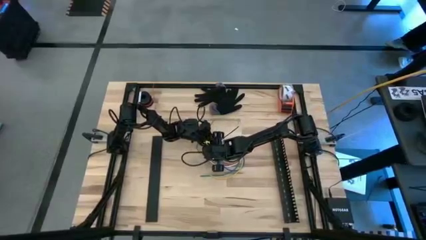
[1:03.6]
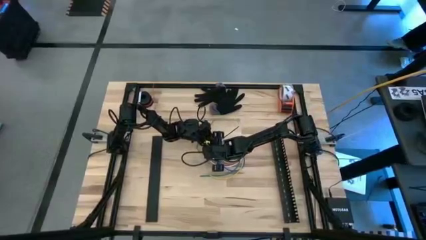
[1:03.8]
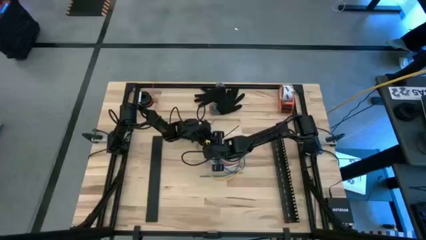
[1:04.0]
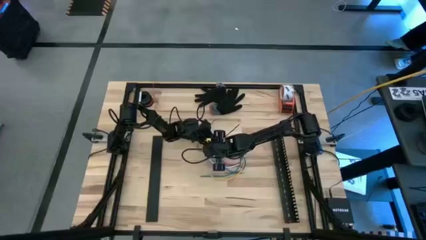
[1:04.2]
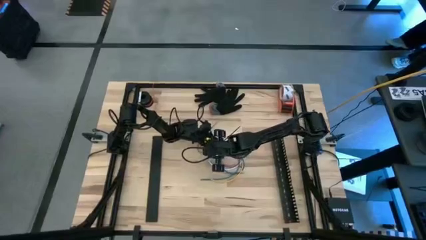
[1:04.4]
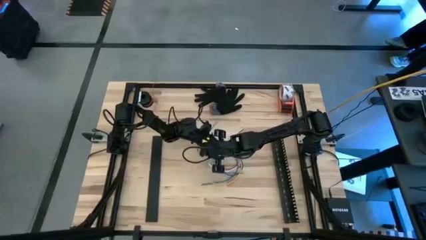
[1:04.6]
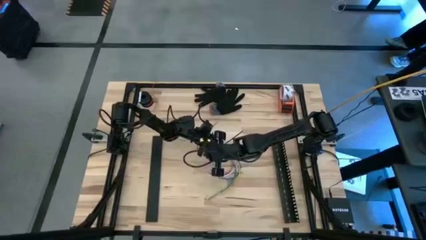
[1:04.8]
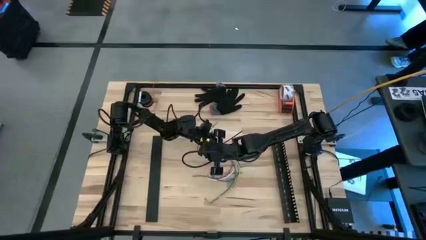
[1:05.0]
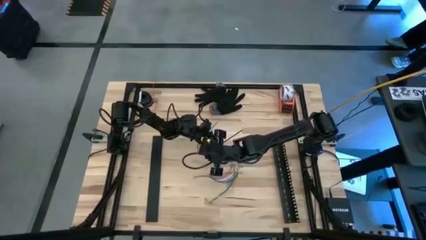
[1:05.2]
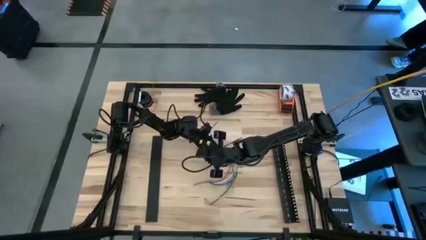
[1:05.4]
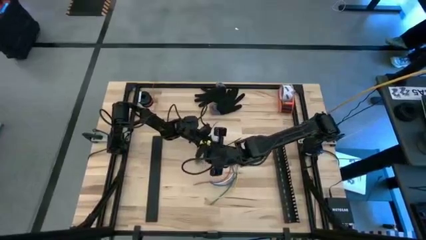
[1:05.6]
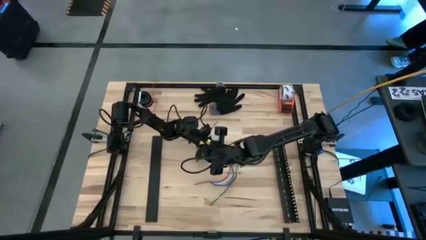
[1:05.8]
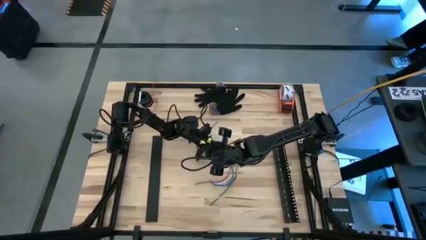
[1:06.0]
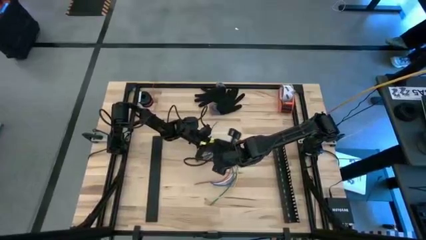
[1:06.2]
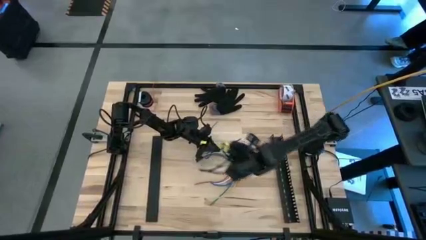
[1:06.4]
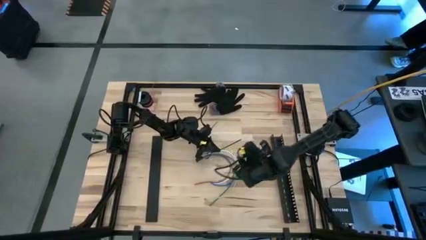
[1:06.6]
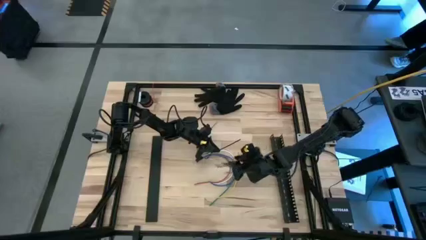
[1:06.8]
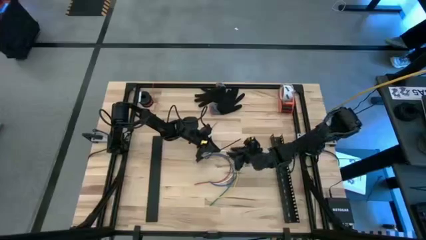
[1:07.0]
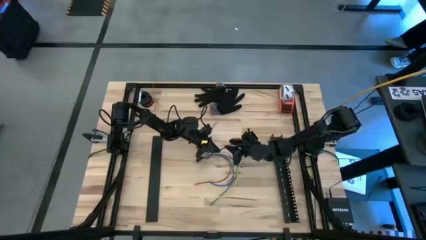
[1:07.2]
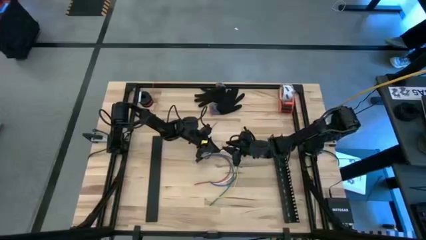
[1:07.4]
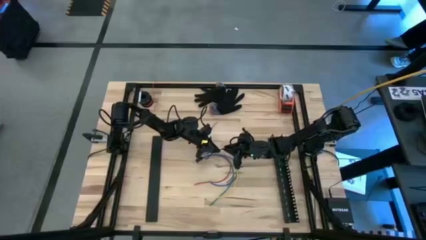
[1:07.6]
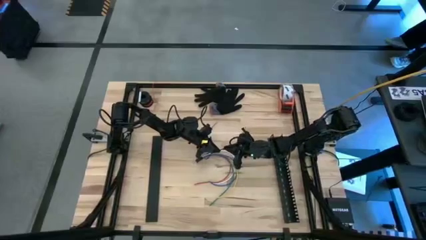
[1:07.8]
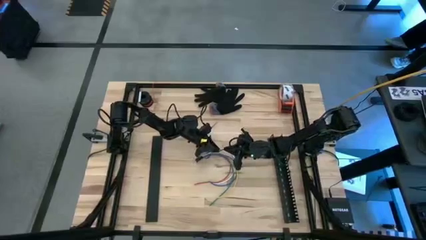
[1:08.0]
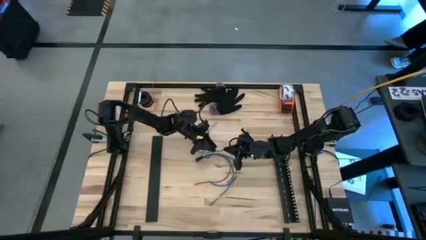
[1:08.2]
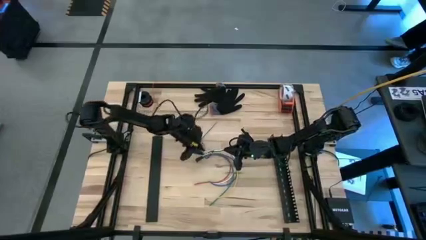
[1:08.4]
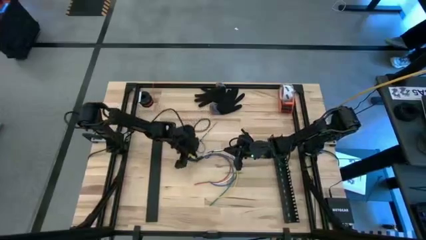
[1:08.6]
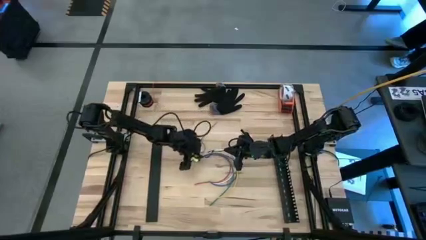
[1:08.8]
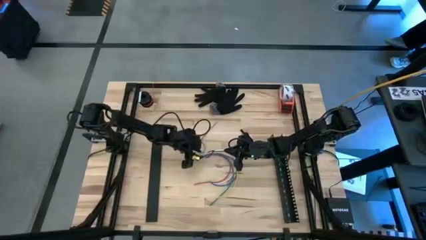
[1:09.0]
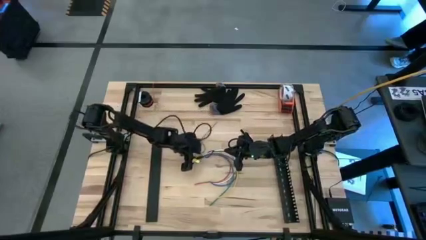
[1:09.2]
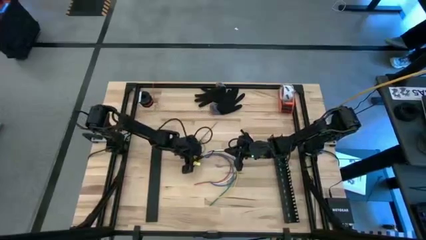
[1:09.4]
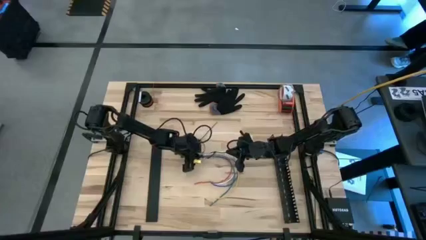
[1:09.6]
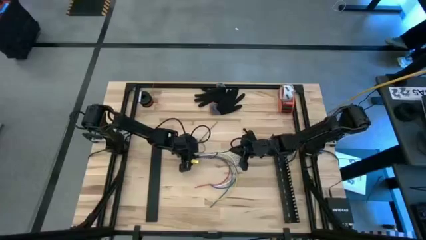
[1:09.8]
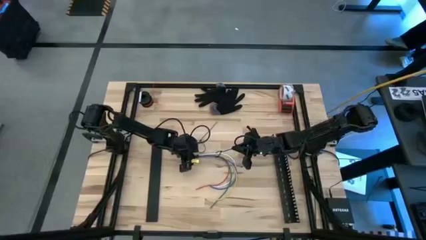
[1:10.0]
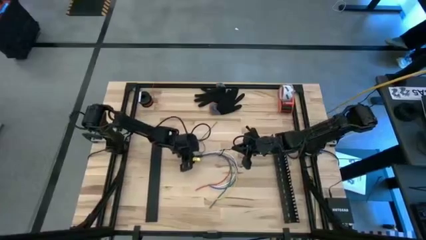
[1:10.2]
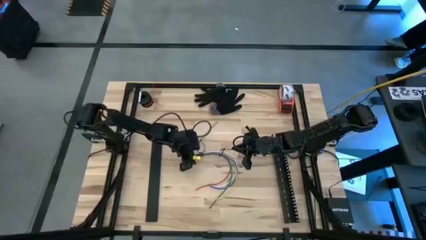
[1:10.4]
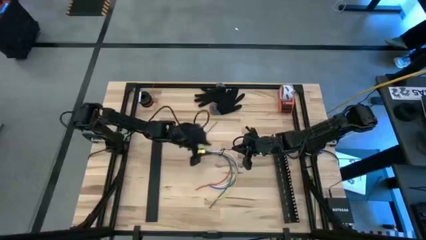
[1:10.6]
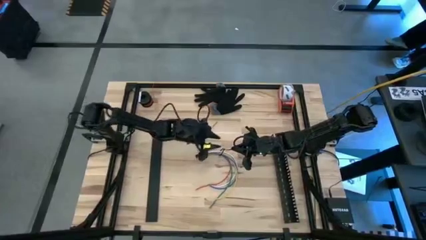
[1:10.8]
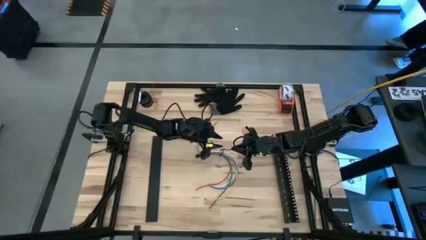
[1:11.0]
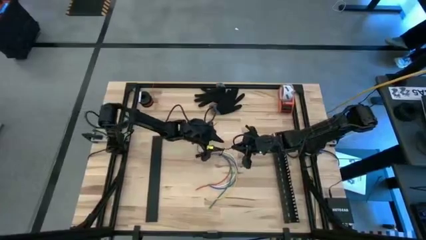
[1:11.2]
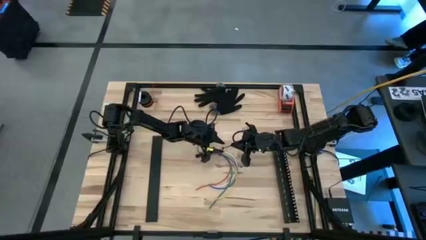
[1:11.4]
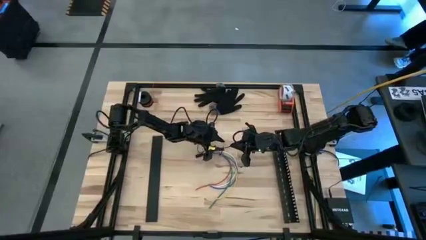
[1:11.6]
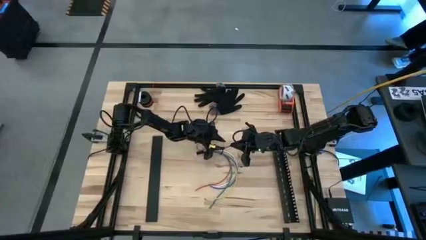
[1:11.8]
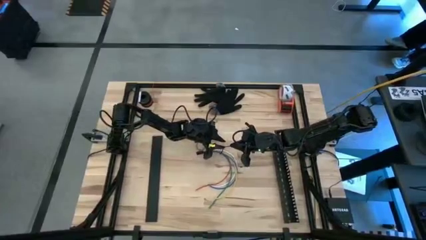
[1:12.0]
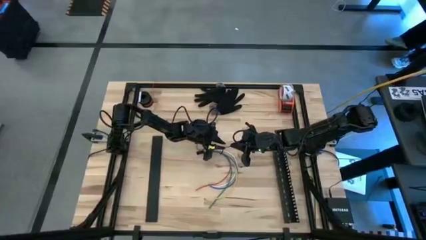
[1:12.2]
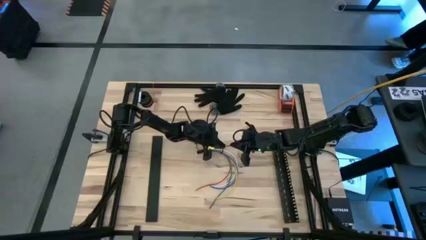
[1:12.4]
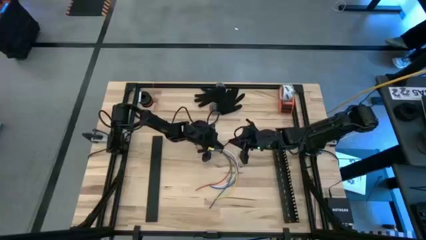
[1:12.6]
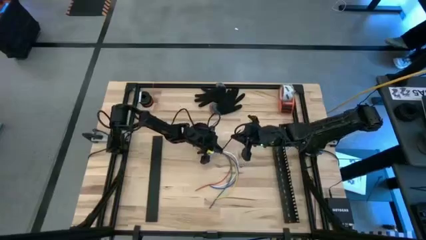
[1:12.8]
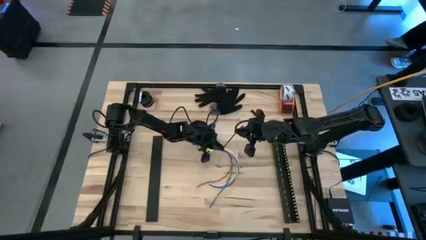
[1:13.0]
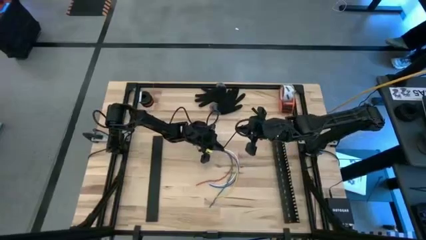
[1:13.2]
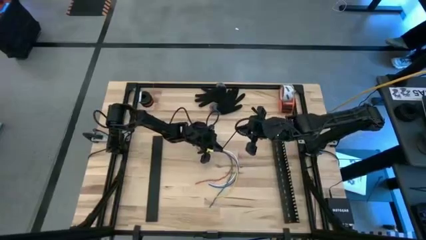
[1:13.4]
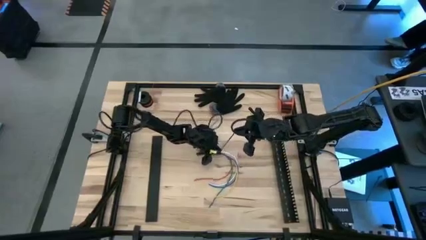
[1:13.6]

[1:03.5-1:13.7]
Task: Ziptie cables
Wrap the cable wires with the left black ziptie

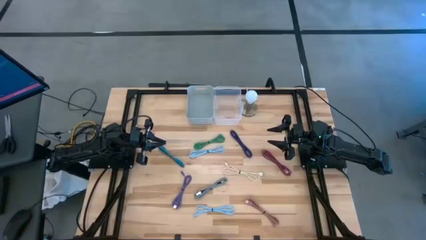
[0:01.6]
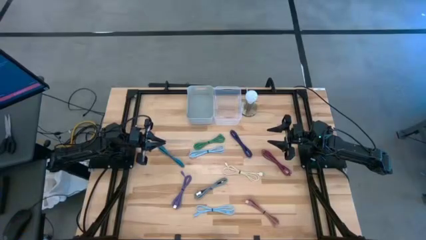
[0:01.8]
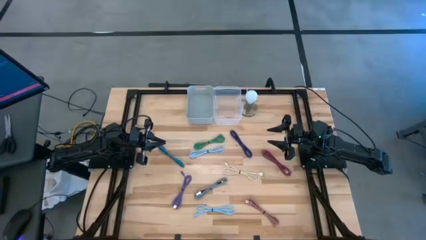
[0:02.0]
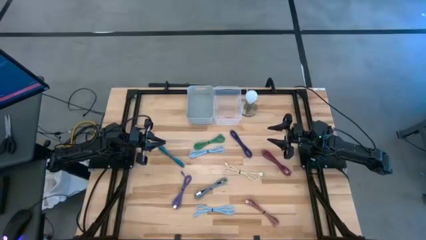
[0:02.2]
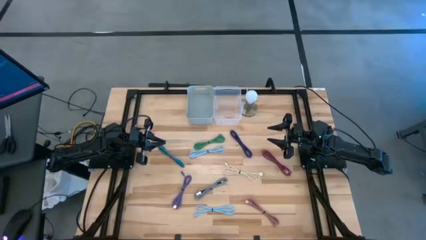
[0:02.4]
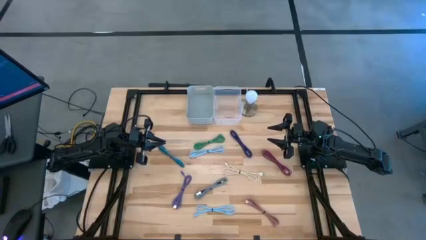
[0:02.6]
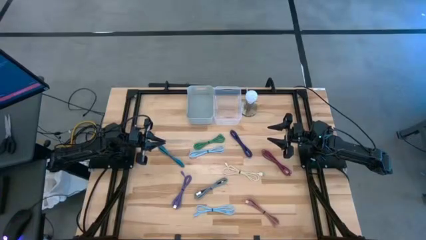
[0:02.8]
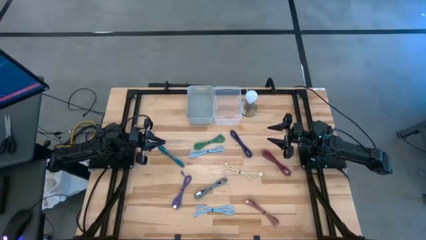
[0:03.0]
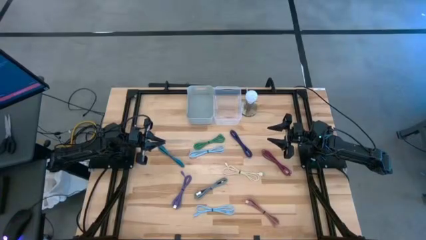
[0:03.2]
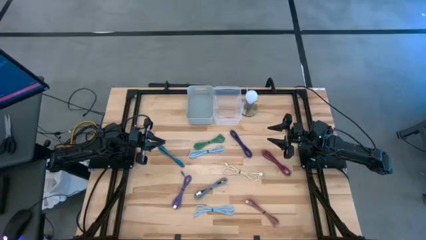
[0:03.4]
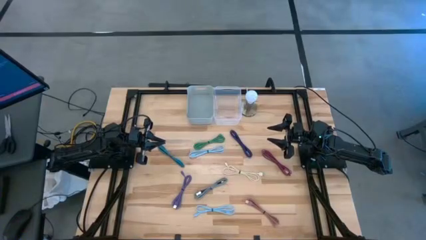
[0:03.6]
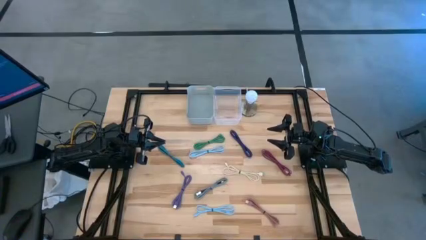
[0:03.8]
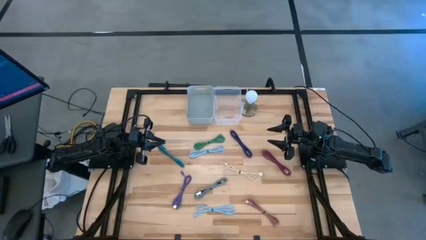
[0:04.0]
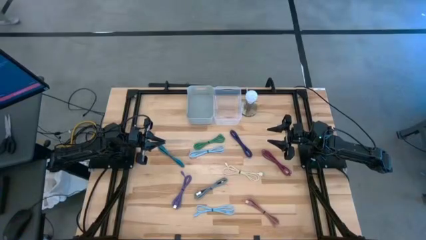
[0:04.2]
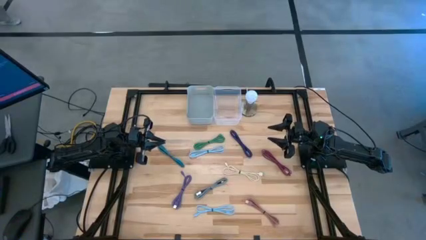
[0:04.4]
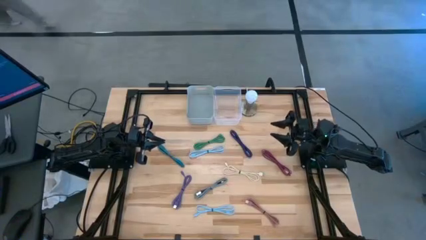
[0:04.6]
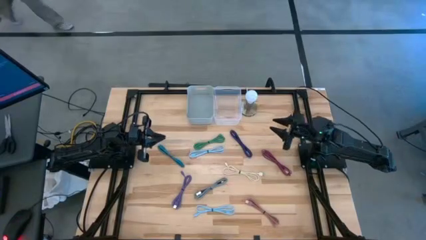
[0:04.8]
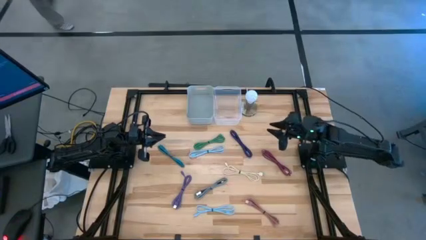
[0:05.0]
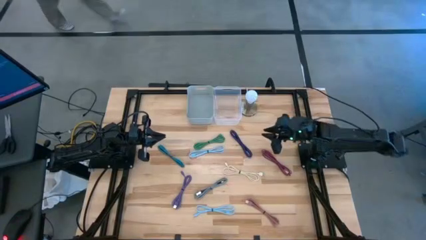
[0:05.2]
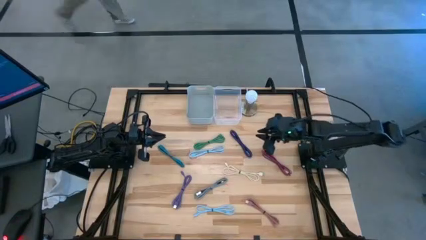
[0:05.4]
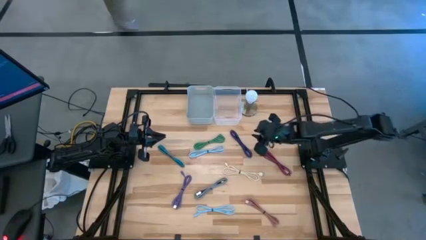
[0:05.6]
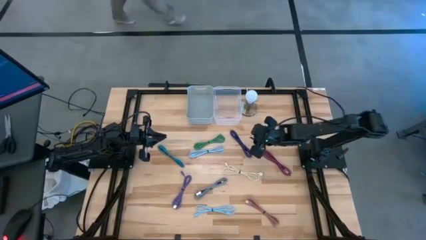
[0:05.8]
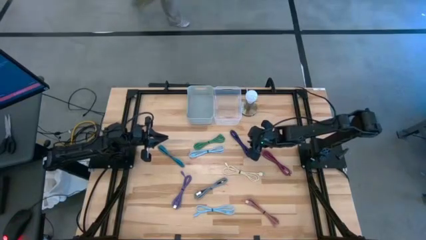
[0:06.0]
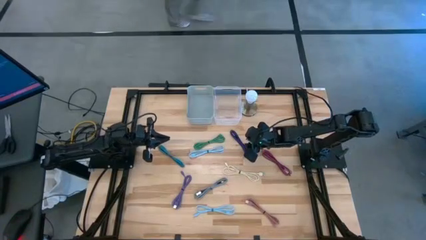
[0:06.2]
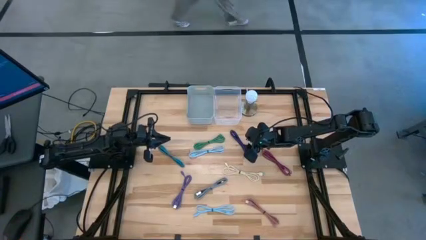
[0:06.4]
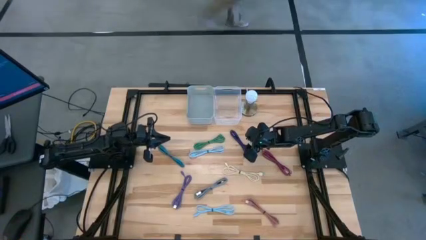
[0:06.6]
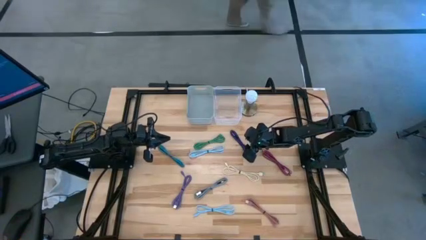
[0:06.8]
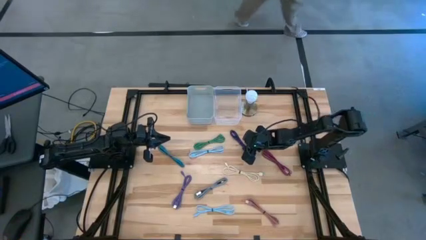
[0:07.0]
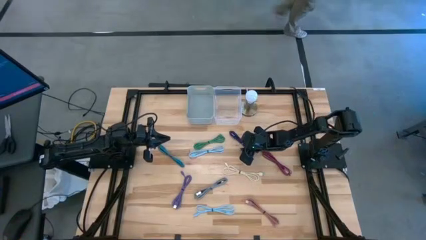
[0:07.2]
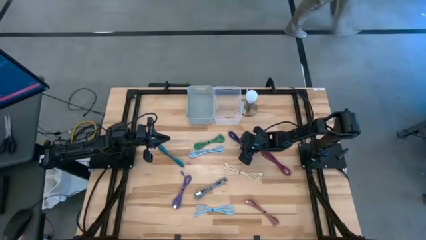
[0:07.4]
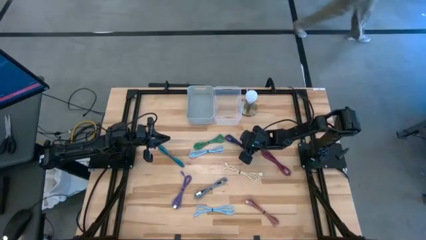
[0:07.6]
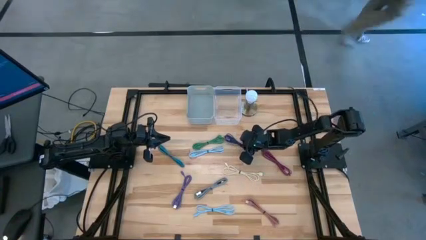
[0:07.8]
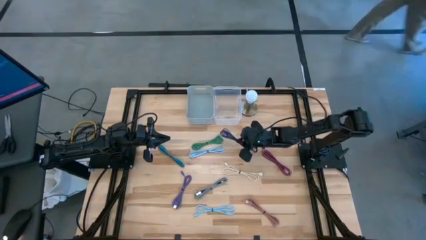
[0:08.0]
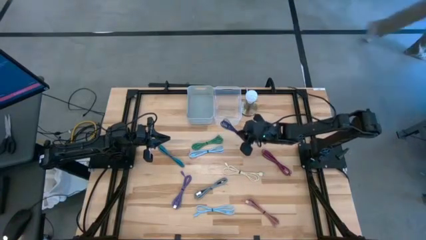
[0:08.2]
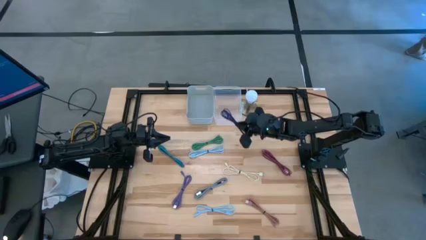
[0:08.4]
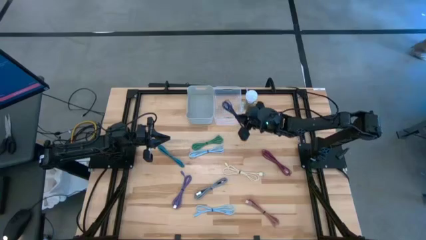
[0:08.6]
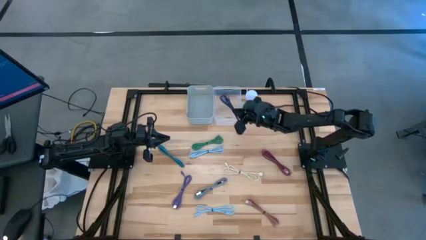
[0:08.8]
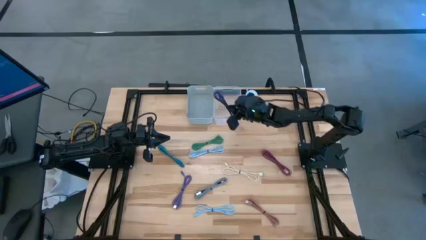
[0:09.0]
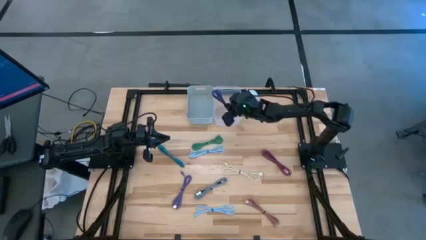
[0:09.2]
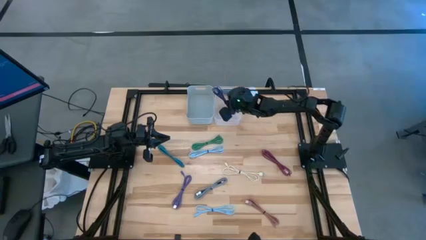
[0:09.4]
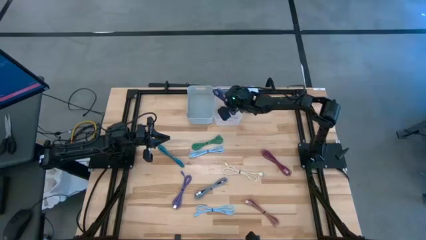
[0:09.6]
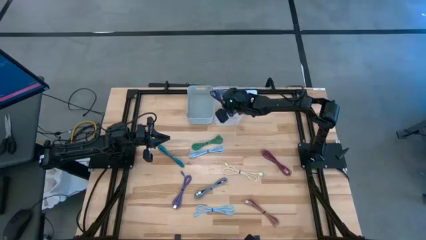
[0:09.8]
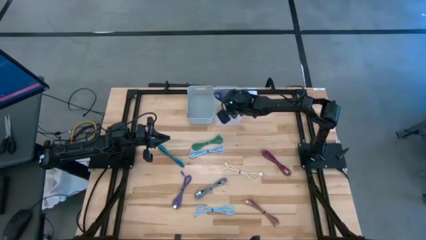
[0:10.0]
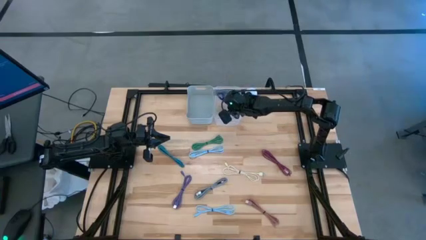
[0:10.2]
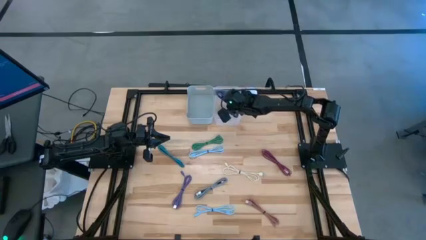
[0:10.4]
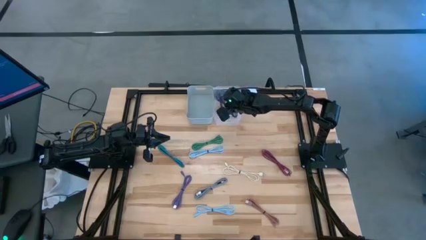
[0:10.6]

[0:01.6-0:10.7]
Task: Pick & Place USB Port
Put the braided purple charger cable into the transparent bin
